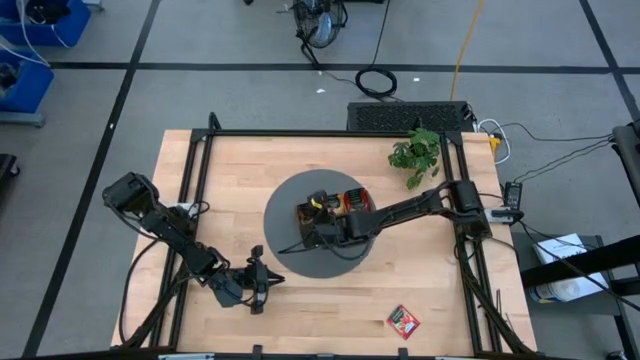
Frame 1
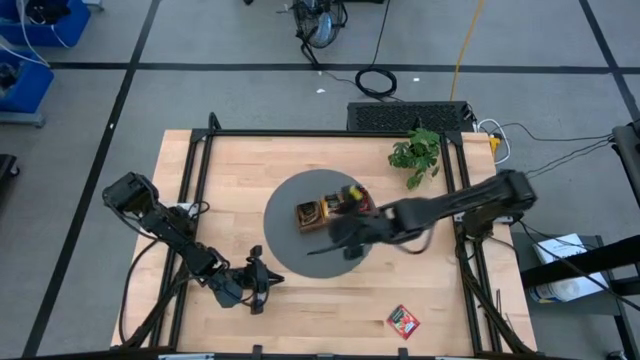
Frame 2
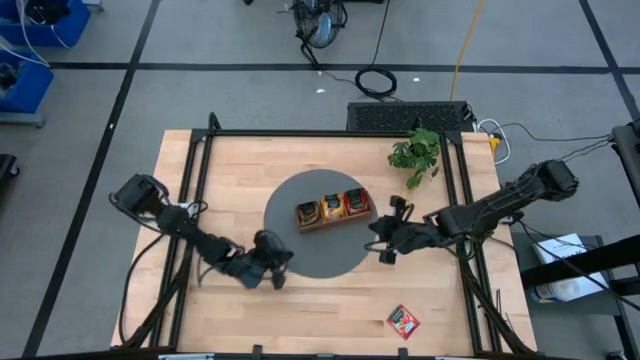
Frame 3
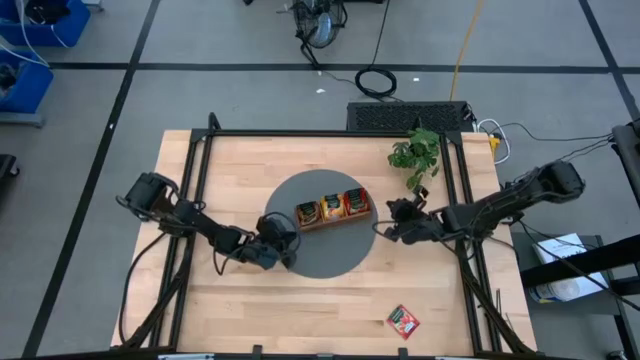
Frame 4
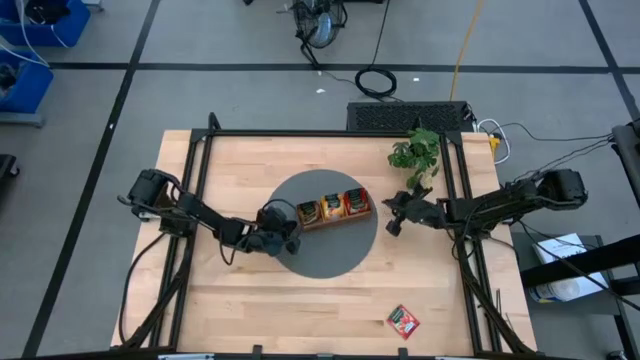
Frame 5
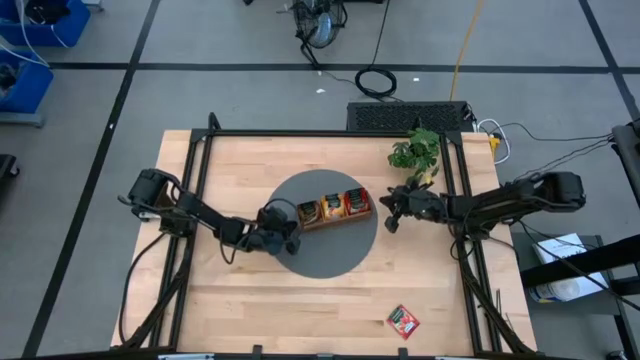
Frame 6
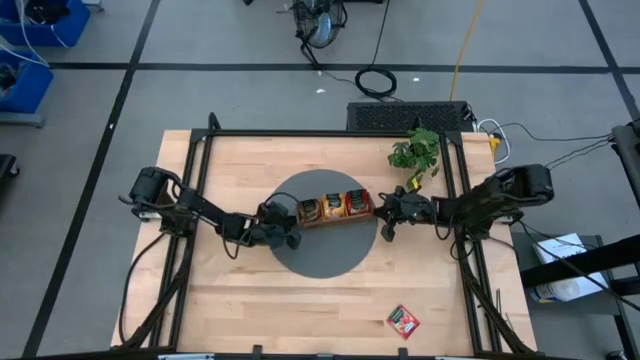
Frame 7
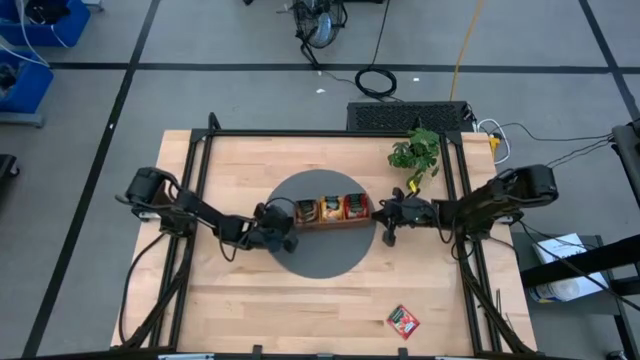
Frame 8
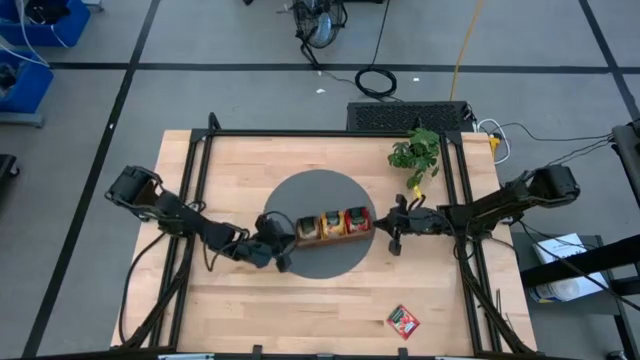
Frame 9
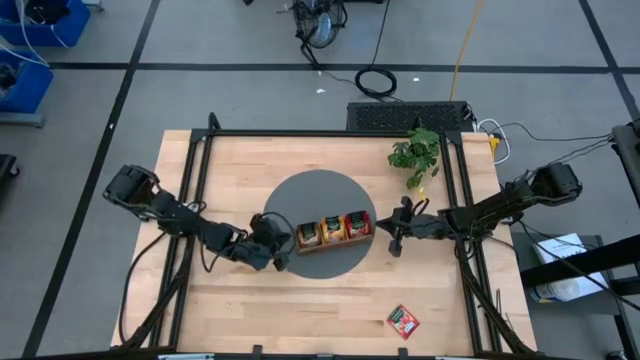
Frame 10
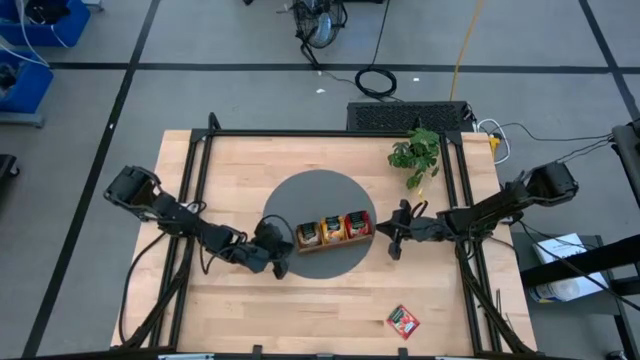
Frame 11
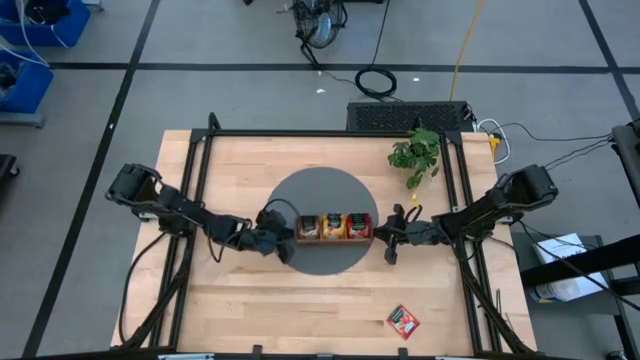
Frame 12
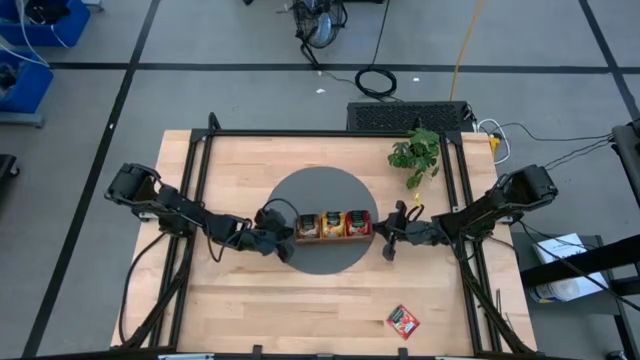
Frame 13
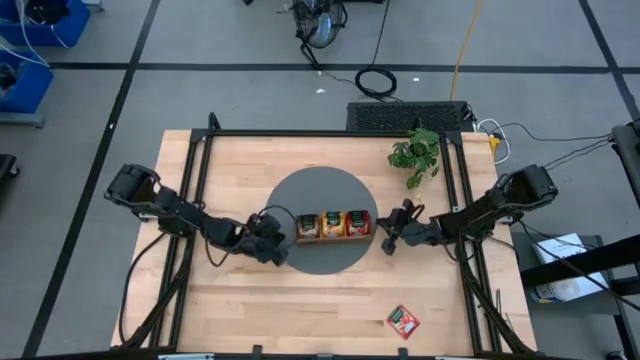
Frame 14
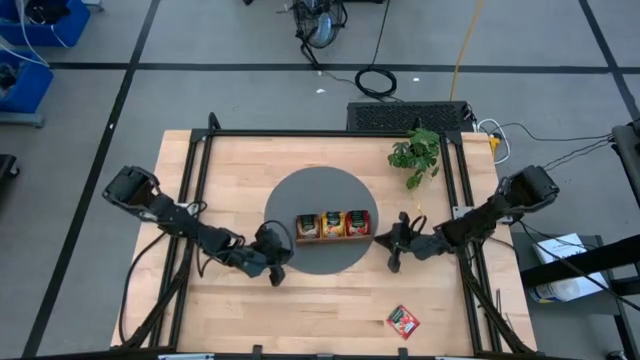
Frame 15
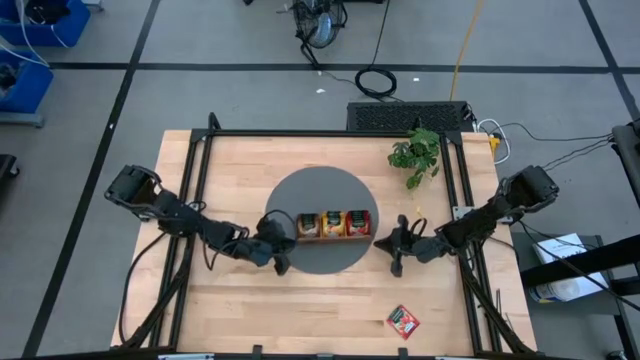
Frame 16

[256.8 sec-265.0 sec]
Task: Pick & Place Tea
Adjust the wooden organizer

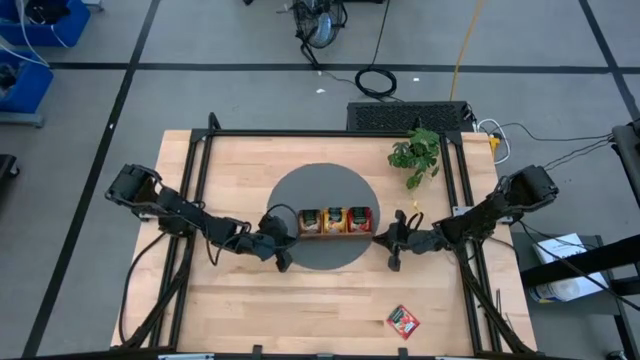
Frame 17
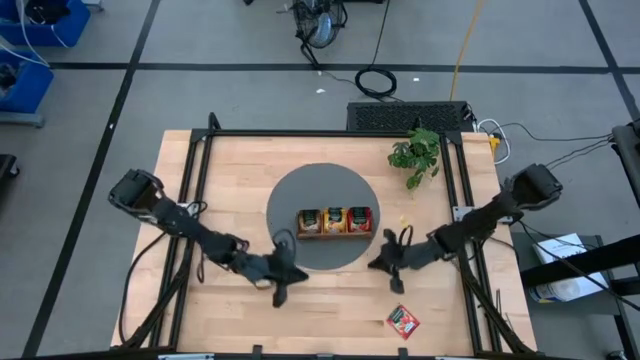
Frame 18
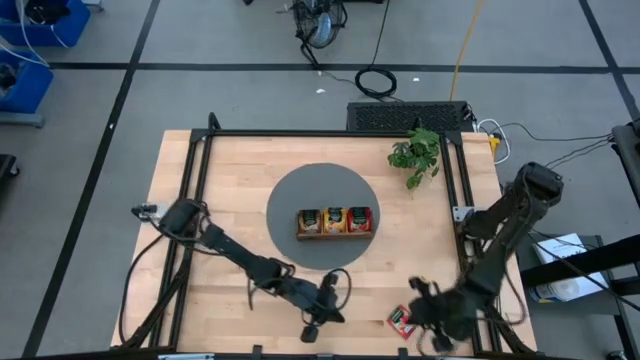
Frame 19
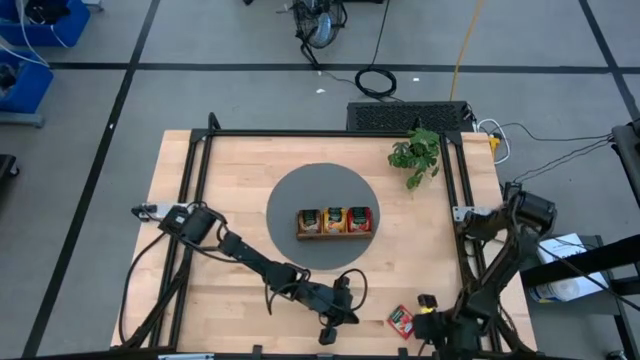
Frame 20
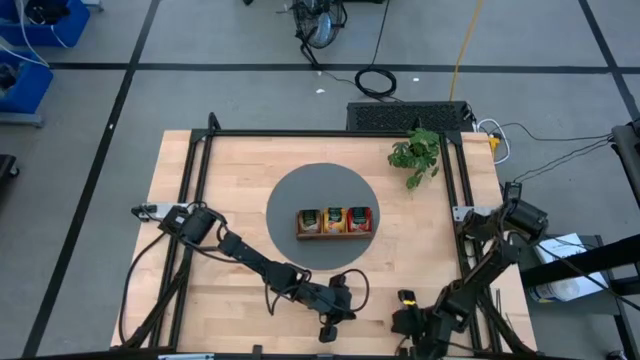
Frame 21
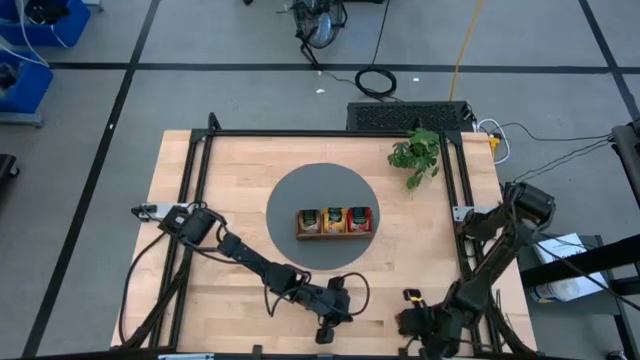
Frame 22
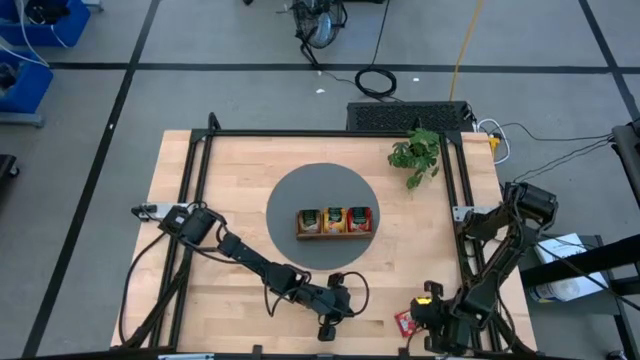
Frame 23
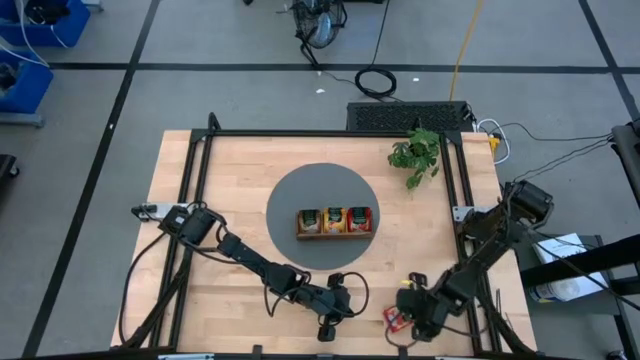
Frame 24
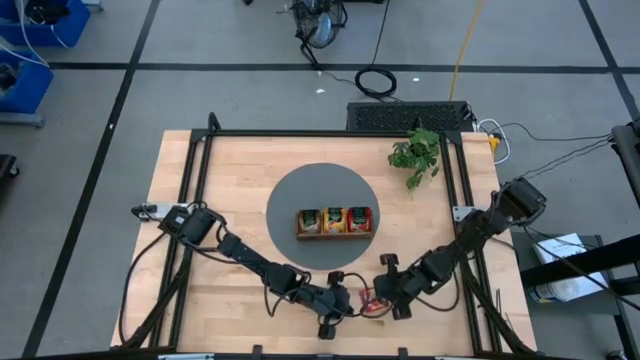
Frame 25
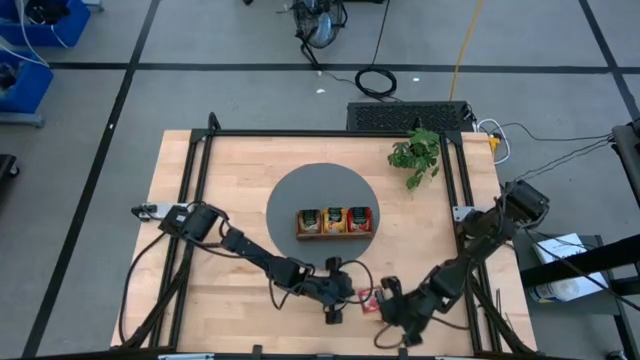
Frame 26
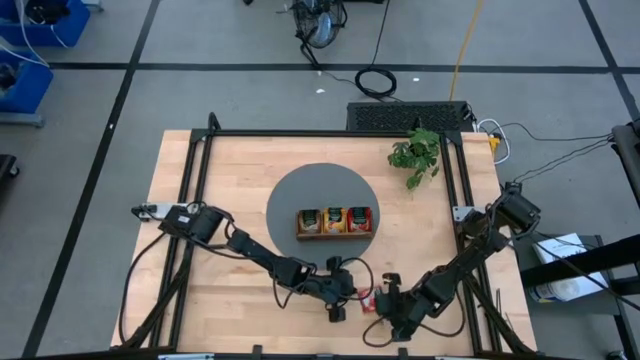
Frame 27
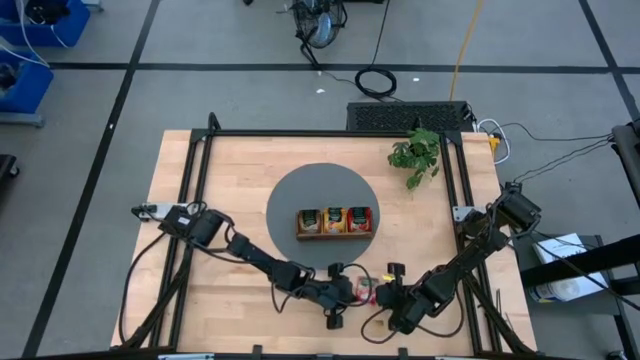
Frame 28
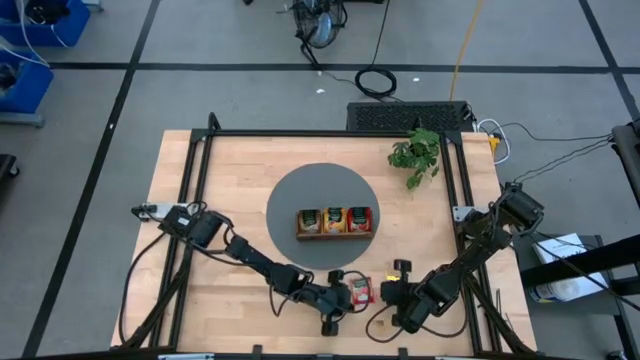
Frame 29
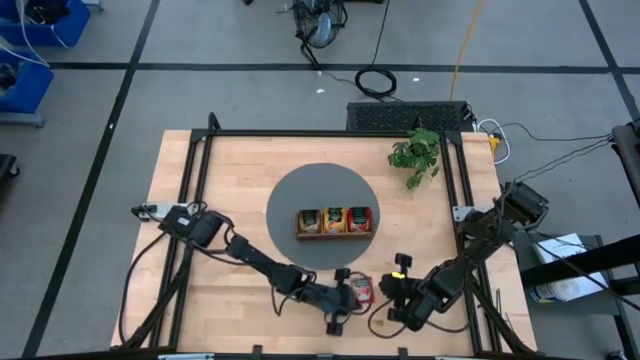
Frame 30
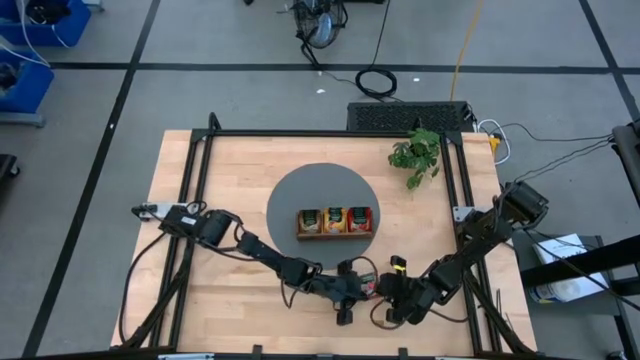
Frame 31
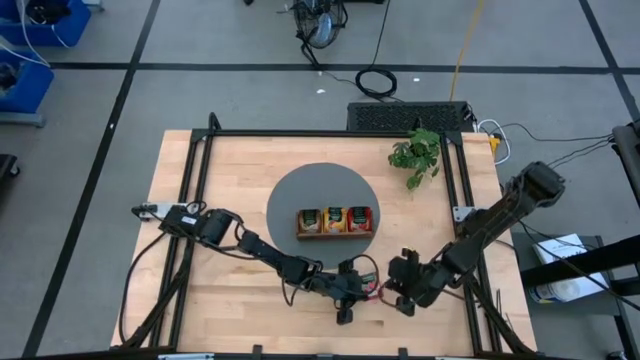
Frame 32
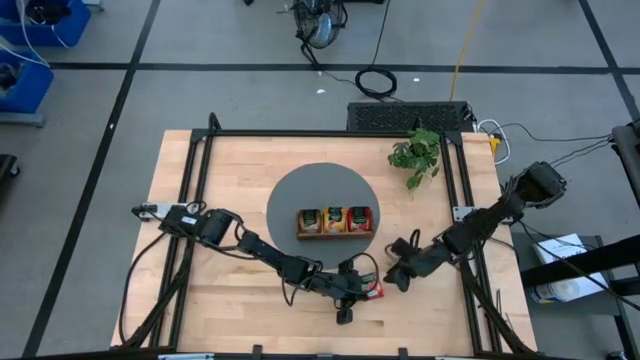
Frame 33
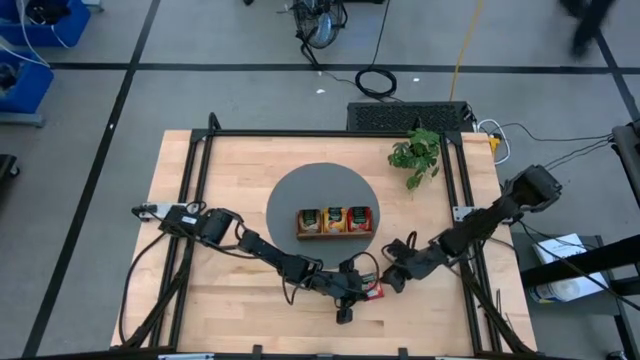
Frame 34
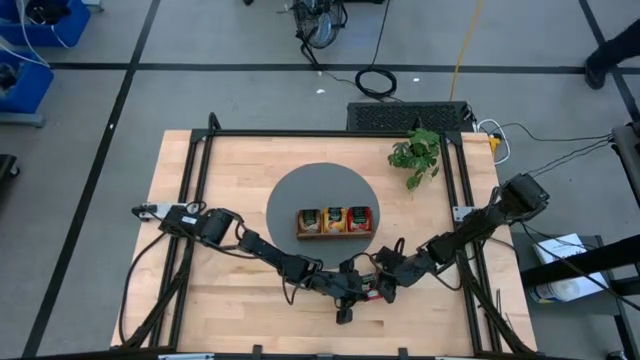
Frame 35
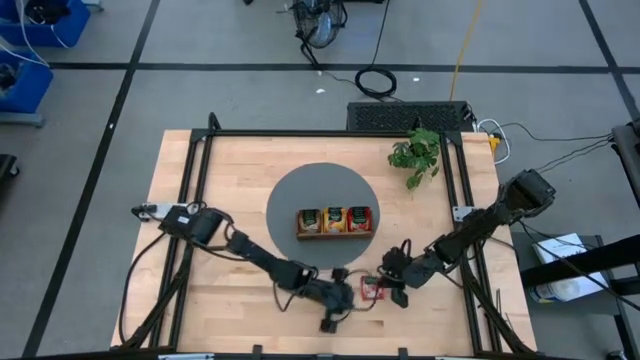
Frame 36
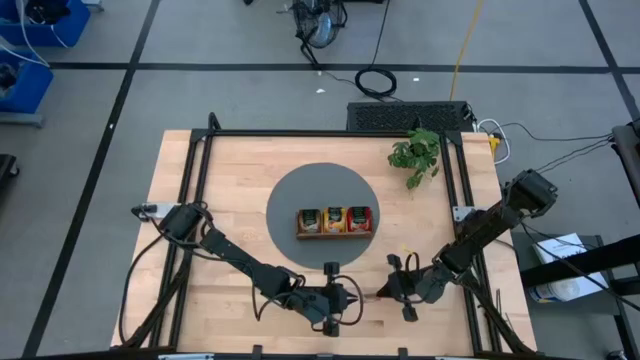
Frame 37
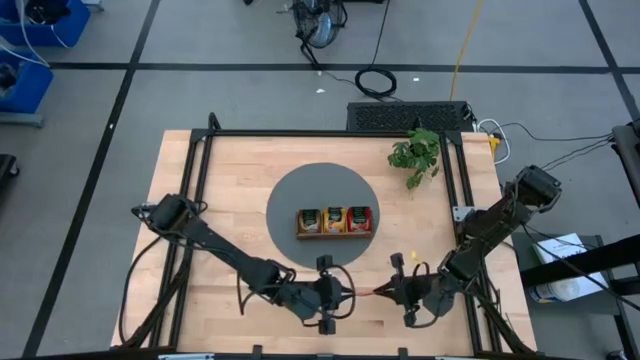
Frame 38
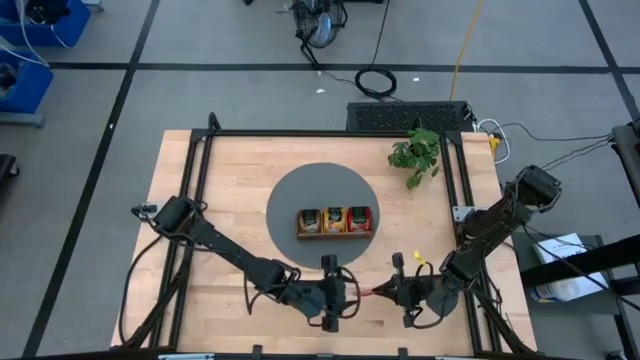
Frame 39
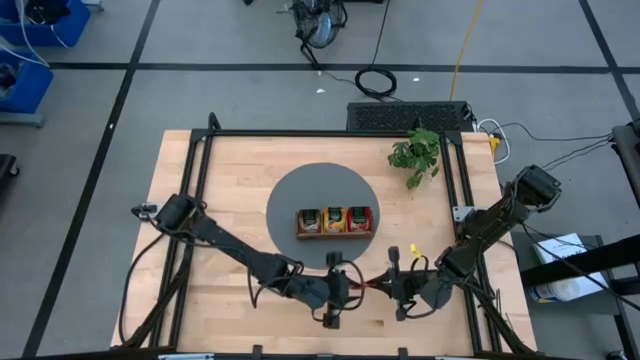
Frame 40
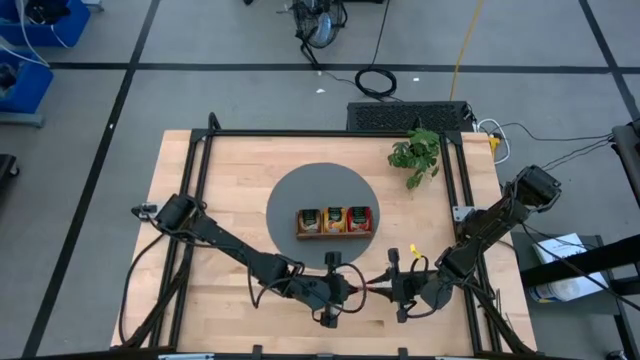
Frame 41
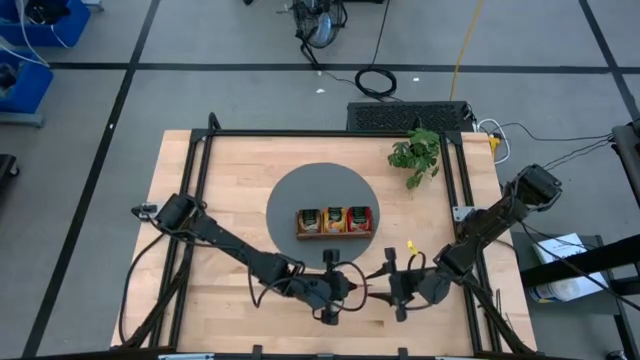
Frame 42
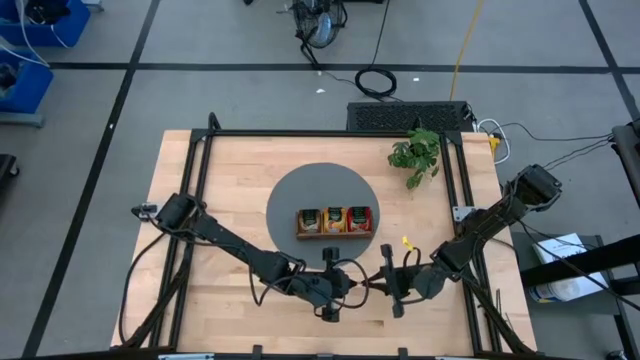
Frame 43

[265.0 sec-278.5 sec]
Put the red tea sachet into the right section of the wooden organizer
